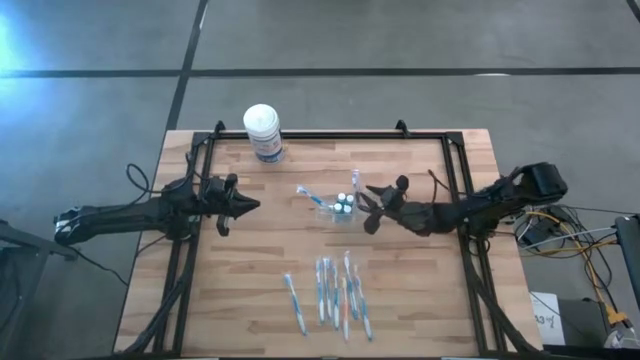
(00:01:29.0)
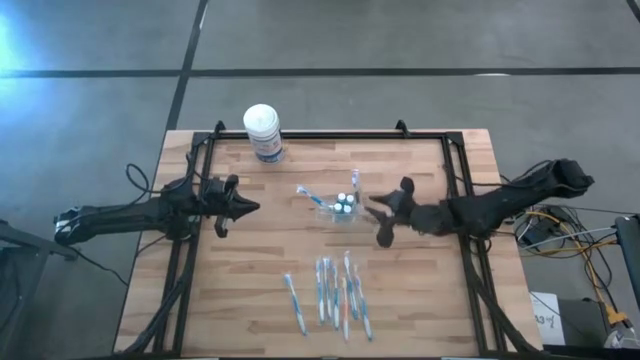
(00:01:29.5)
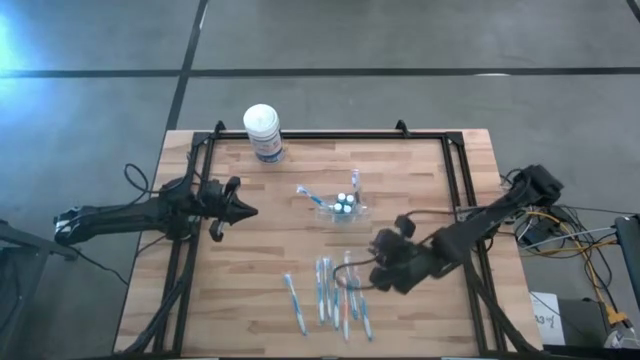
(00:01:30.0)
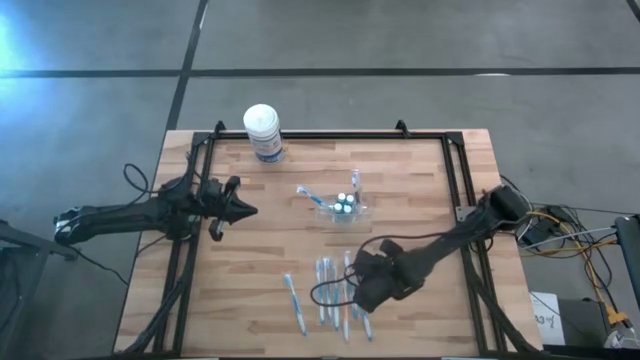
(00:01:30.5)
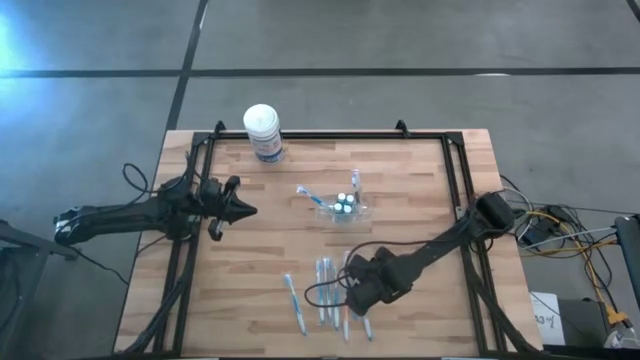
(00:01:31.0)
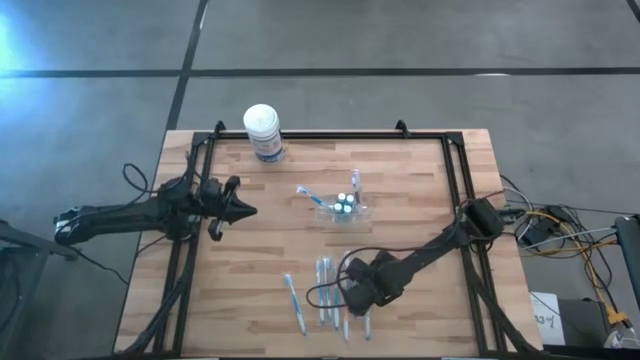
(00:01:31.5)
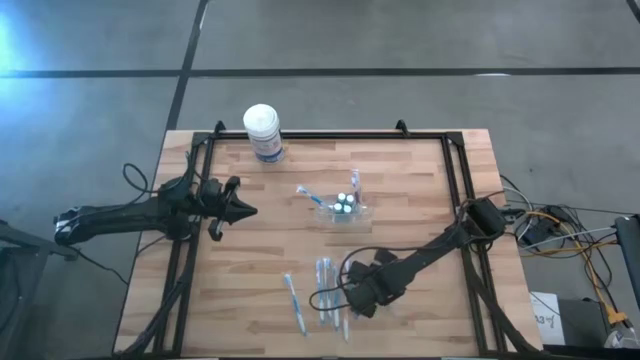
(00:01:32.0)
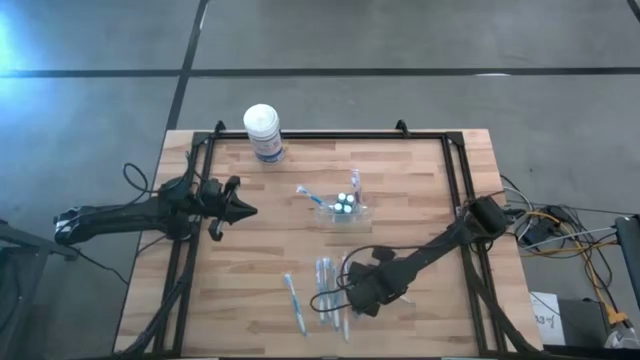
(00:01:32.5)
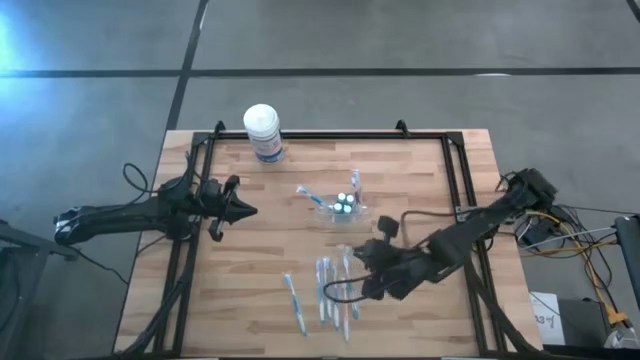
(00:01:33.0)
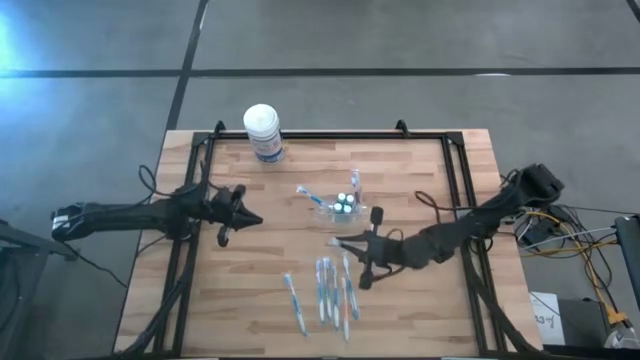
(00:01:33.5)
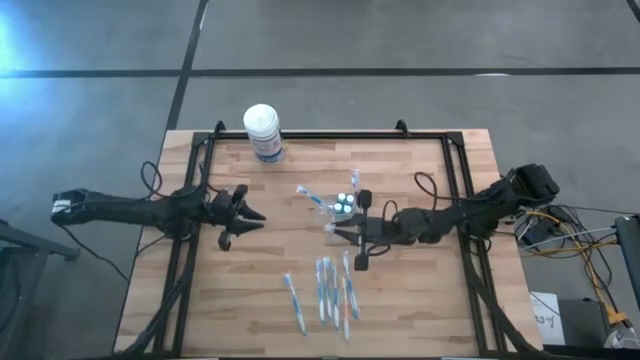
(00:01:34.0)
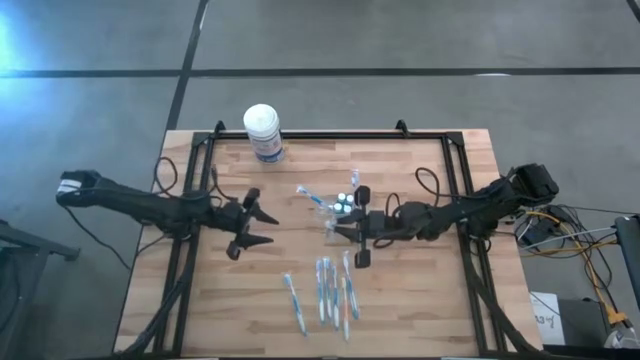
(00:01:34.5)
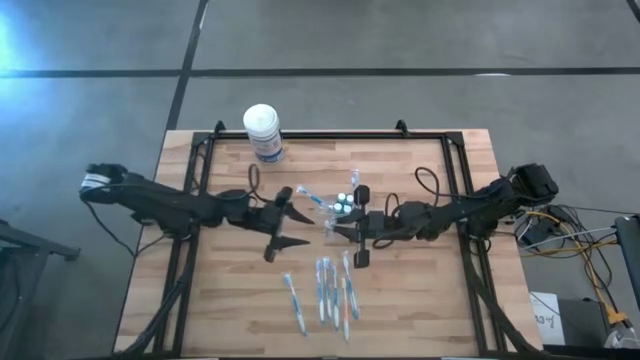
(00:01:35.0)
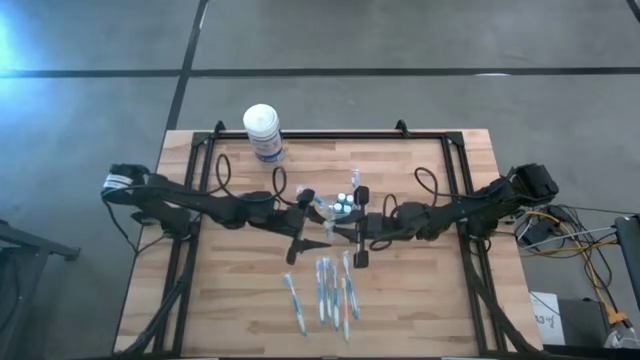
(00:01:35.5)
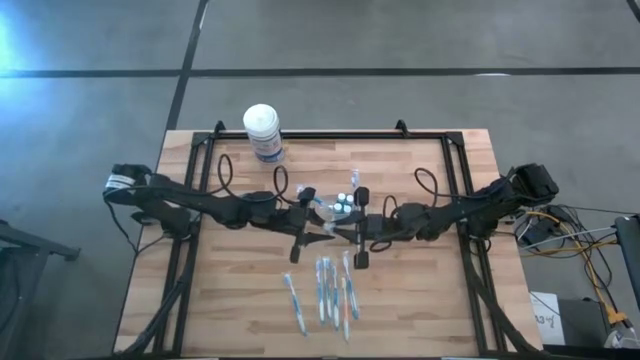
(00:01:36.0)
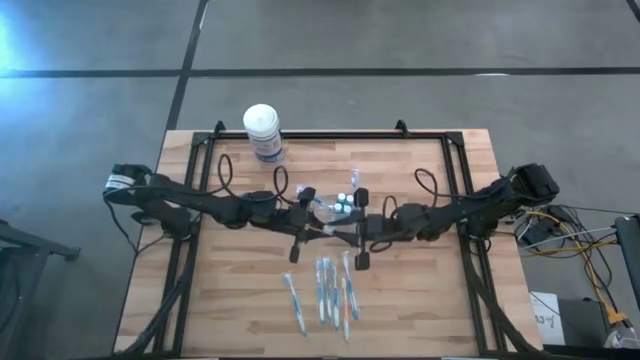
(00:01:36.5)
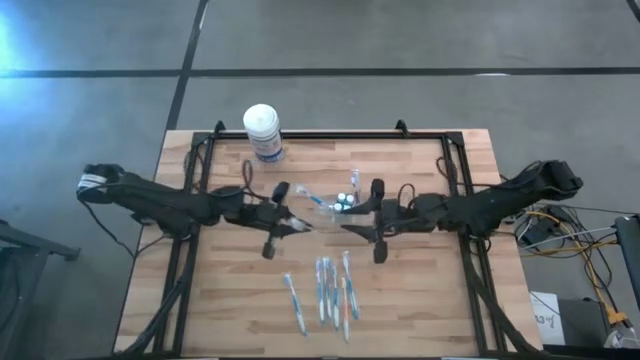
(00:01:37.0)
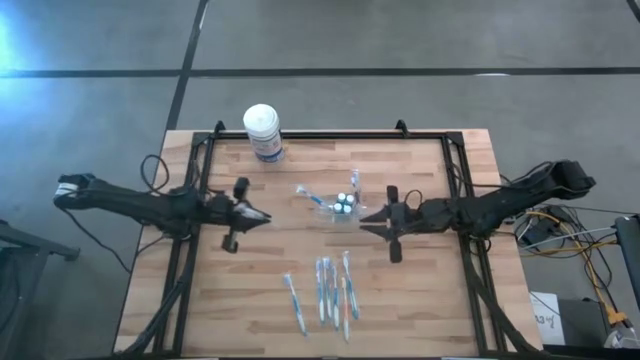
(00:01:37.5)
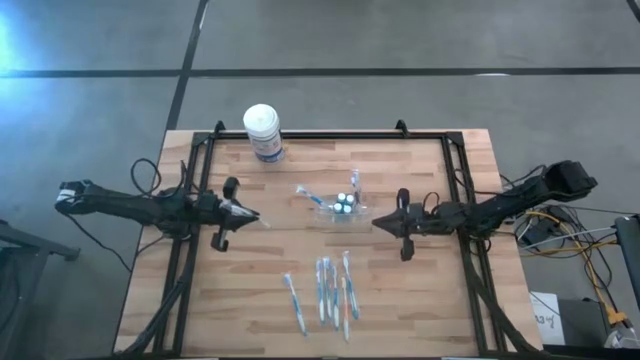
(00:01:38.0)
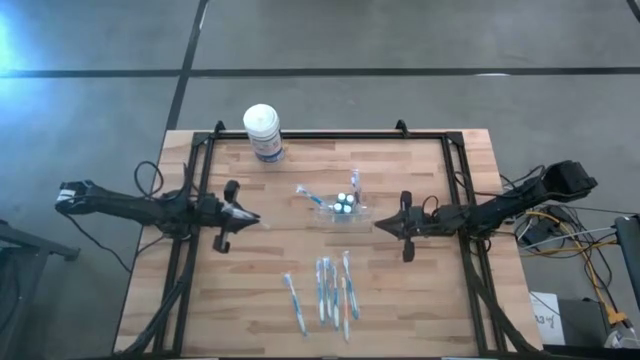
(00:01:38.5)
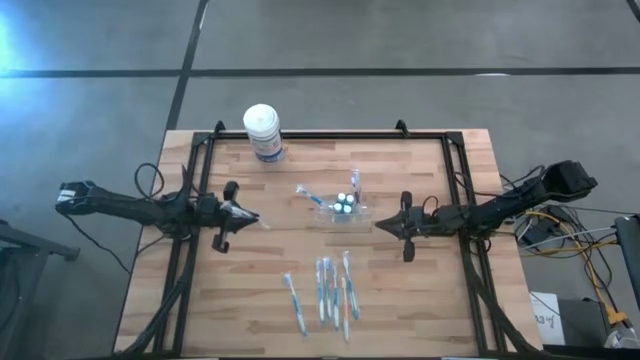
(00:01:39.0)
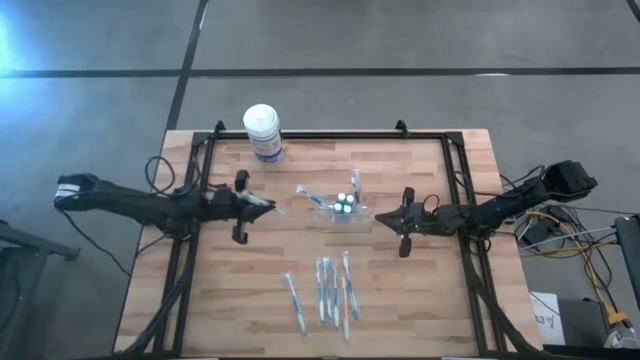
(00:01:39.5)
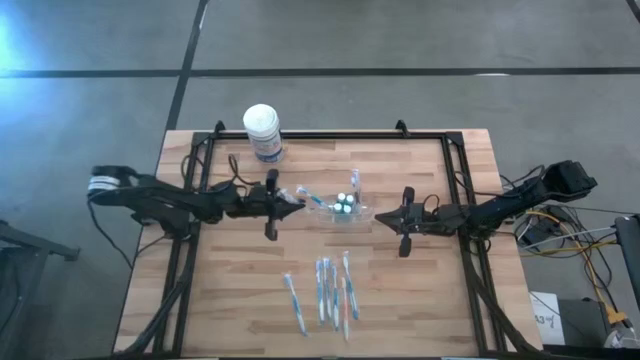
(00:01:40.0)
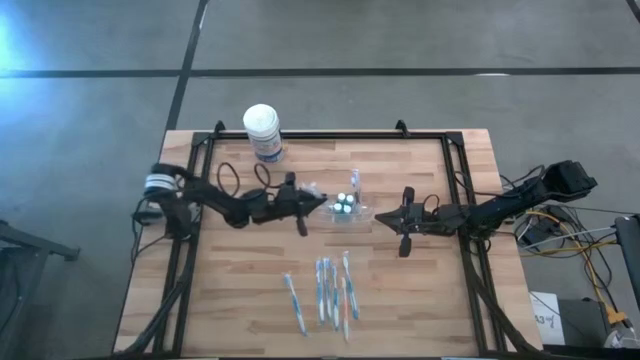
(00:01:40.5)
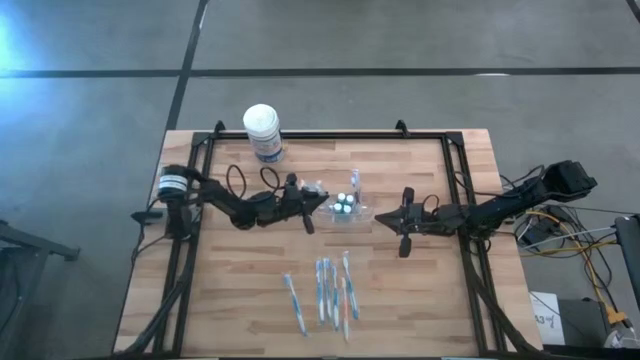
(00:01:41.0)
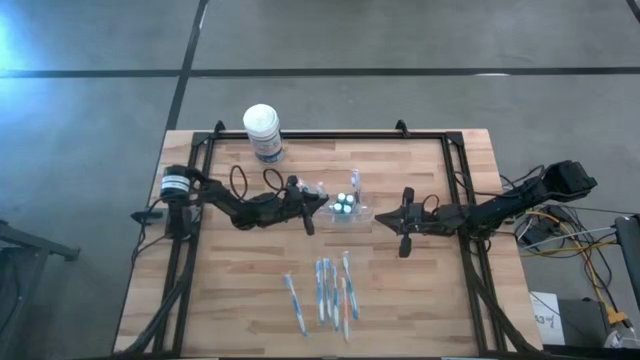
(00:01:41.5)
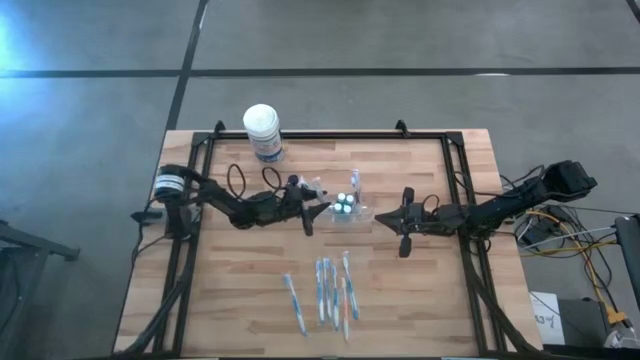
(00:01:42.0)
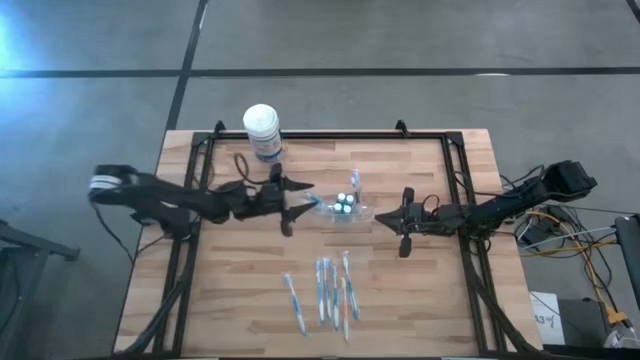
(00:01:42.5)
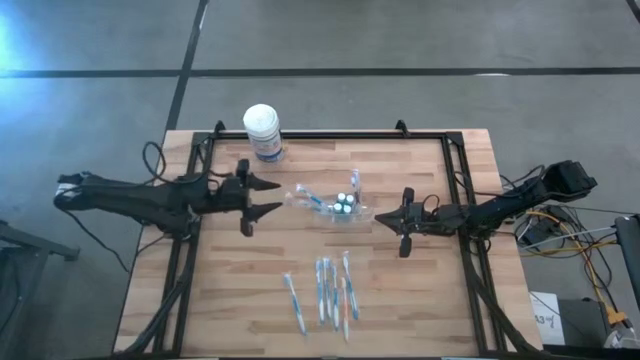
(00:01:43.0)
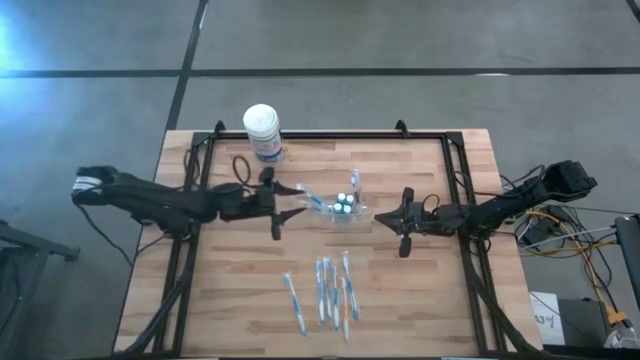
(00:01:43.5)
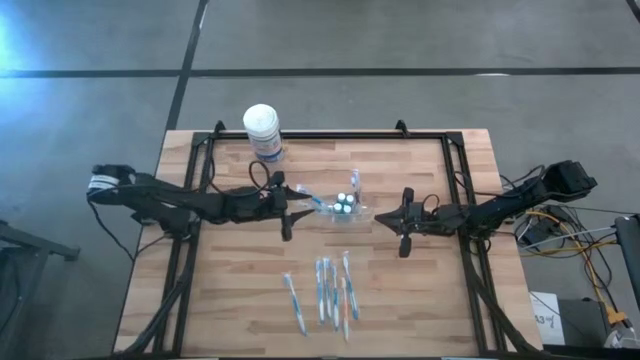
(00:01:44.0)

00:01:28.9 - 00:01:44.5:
Task: Pick & Place toothbrushing station
Put the blue toothbrush into the transparent organizer

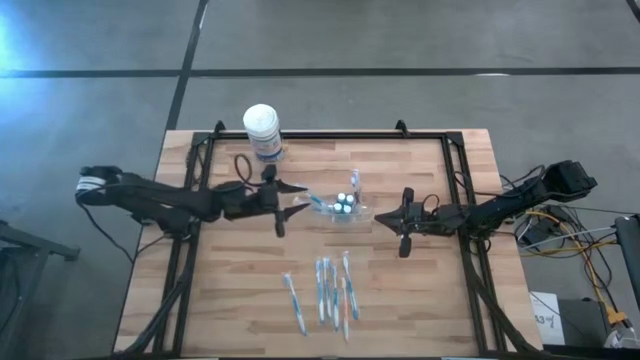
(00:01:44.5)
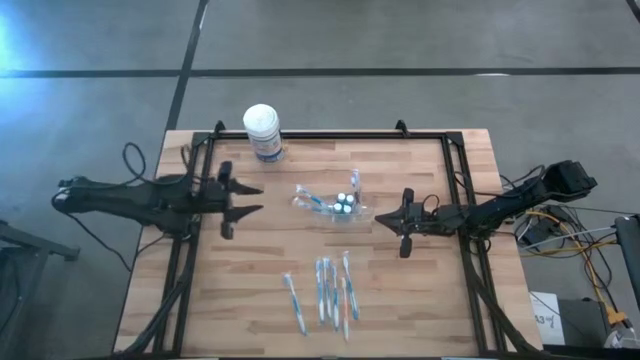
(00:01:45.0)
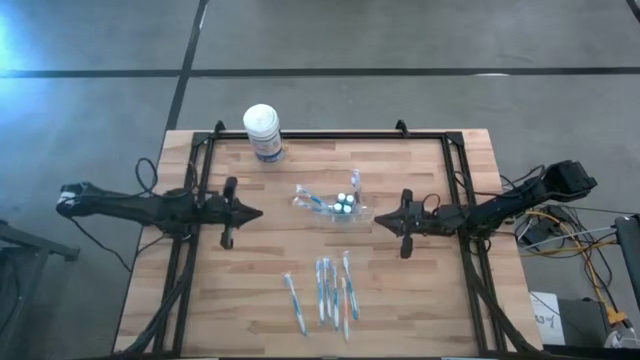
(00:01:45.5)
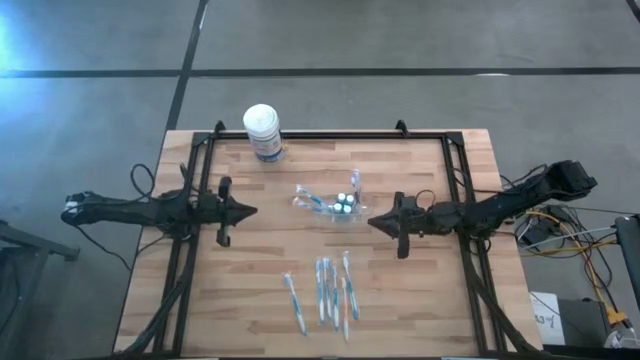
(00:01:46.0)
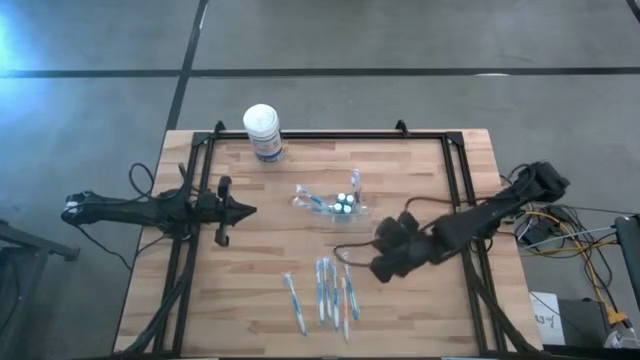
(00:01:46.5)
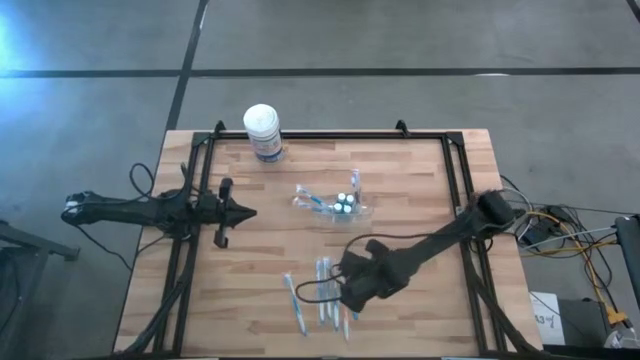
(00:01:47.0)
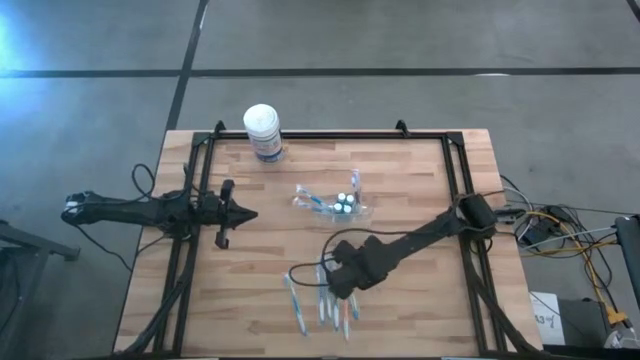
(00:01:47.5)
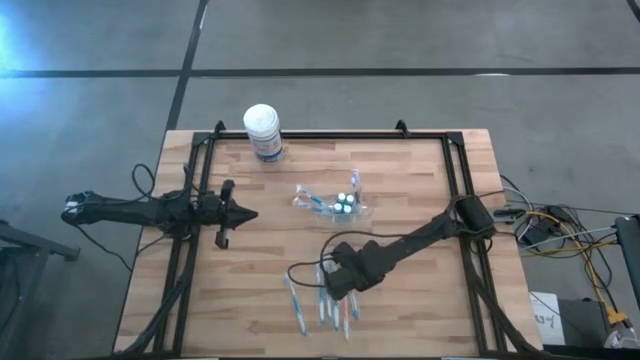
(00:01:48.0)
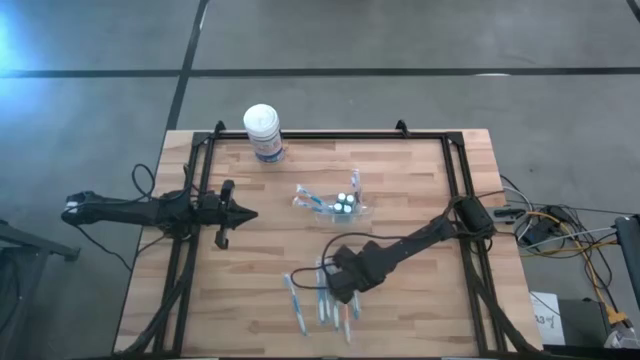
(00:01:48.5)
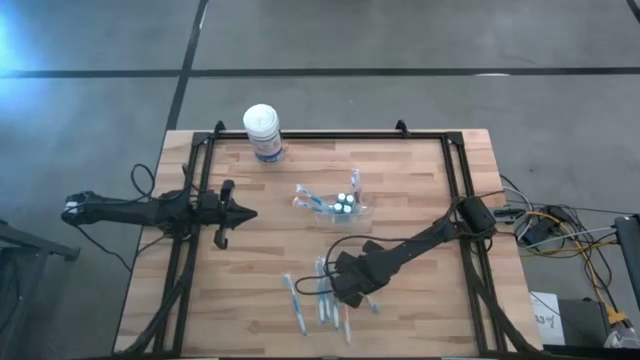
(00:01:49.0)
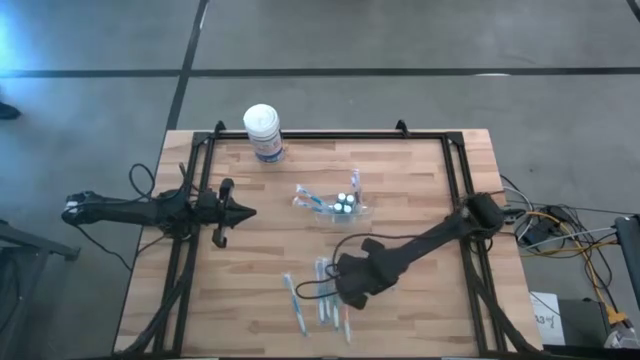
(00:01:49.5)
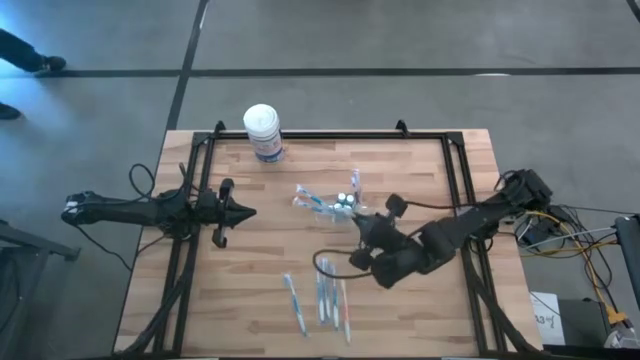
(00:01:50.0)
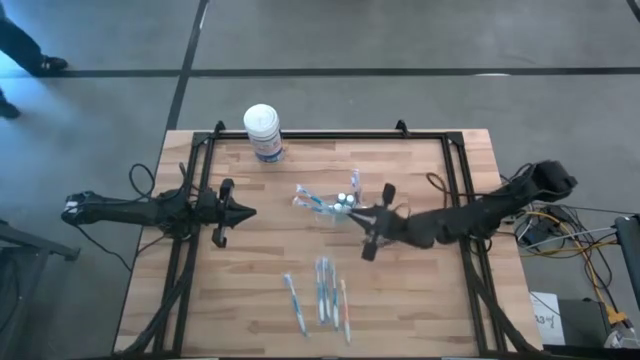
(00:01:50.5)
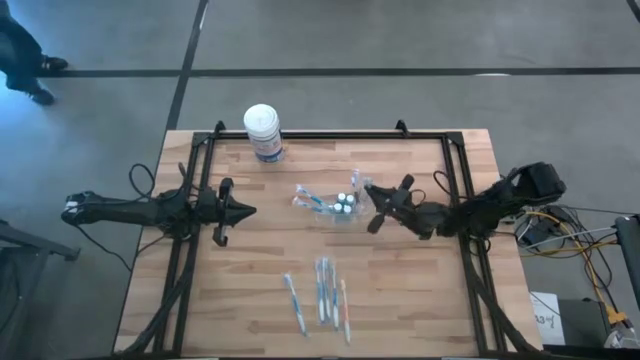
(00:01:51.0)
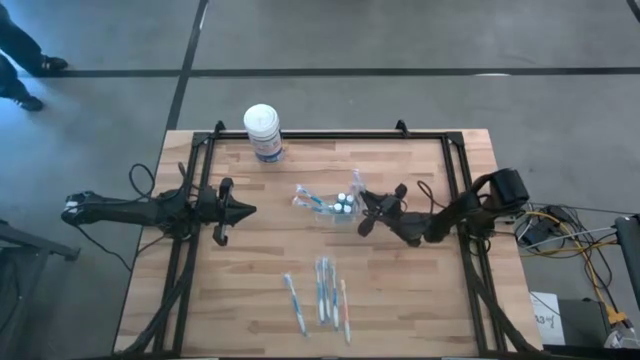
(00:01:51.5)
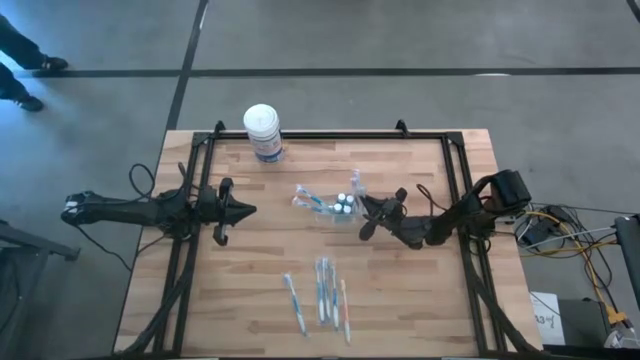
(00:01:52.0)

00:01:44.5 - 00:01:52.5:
Put the blue toothbrush into the transparent organizer
